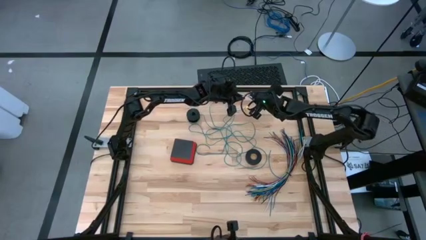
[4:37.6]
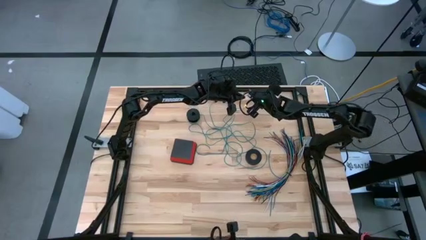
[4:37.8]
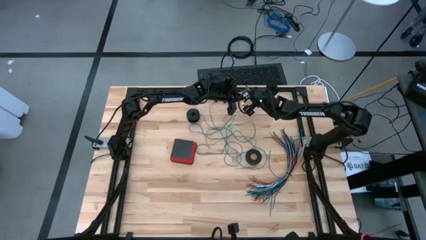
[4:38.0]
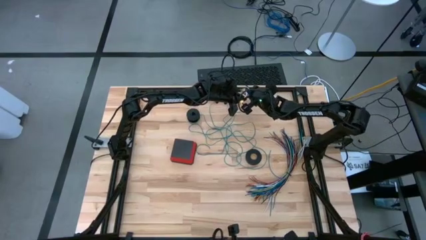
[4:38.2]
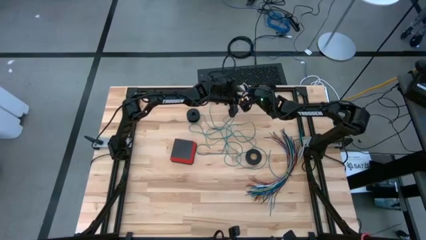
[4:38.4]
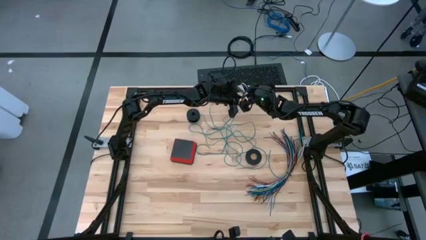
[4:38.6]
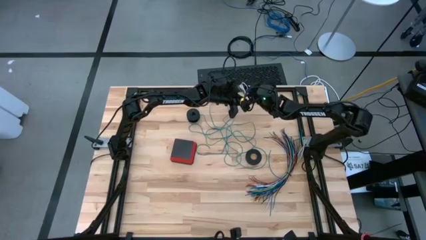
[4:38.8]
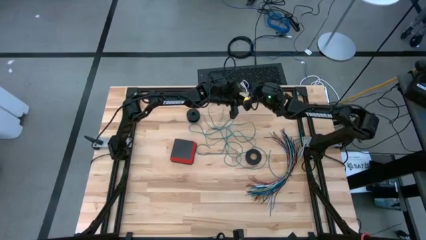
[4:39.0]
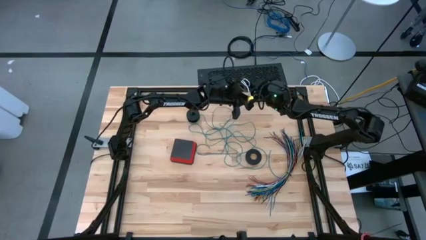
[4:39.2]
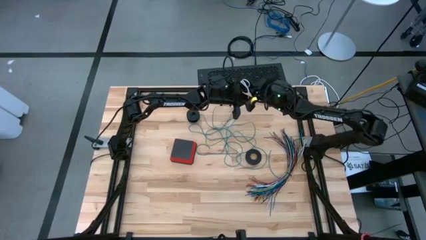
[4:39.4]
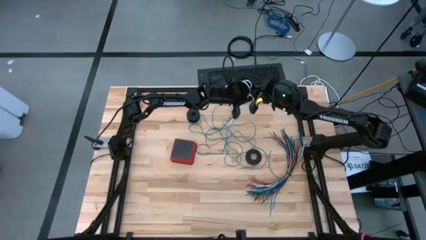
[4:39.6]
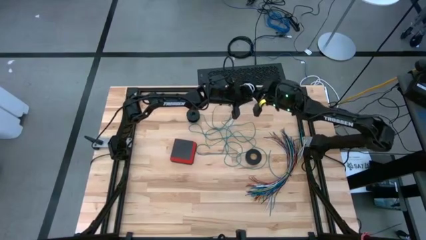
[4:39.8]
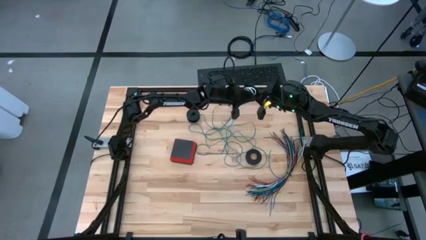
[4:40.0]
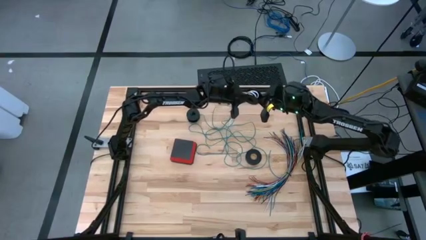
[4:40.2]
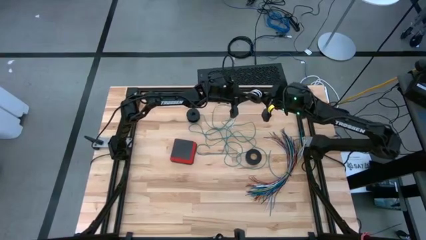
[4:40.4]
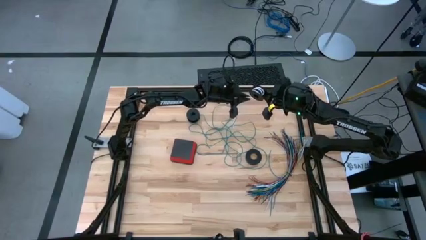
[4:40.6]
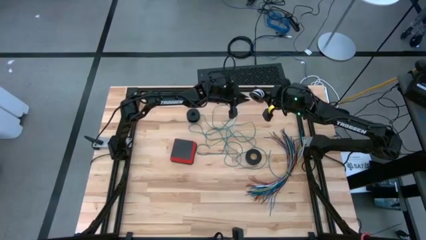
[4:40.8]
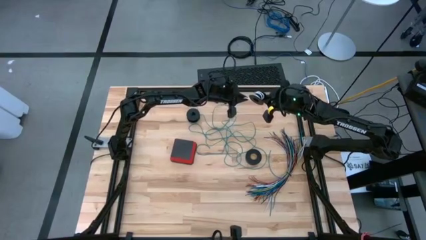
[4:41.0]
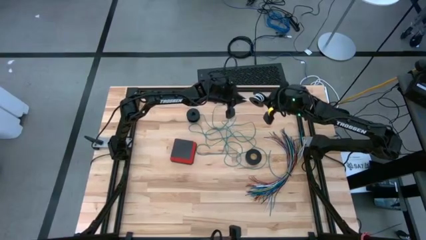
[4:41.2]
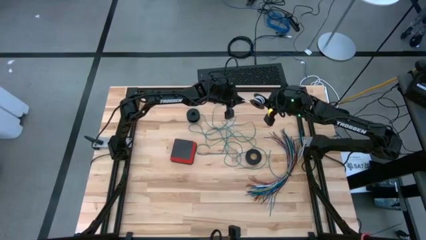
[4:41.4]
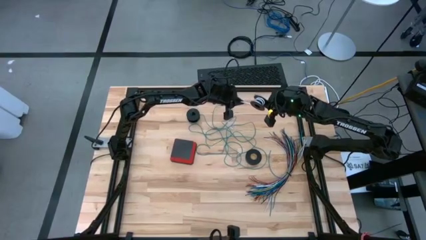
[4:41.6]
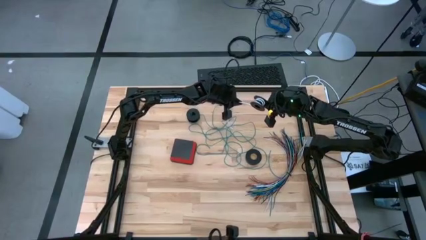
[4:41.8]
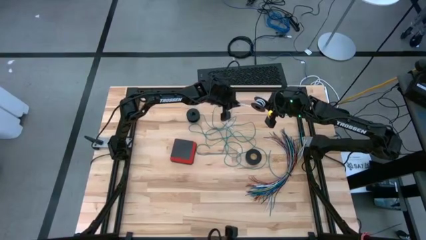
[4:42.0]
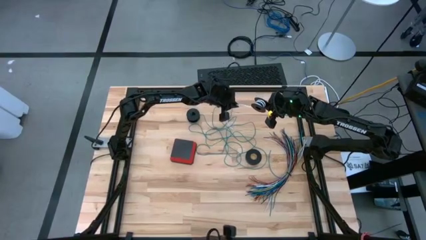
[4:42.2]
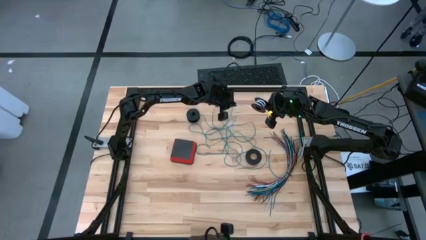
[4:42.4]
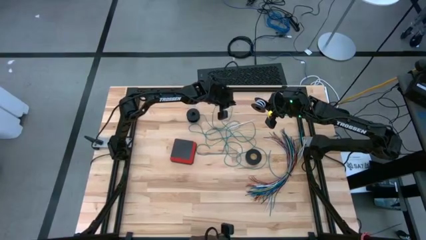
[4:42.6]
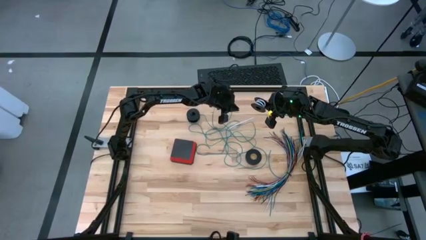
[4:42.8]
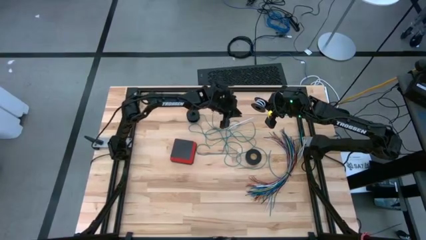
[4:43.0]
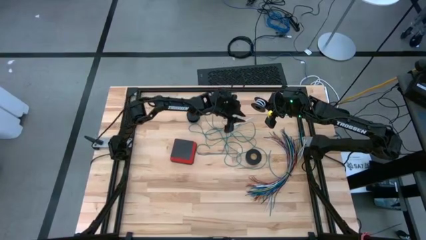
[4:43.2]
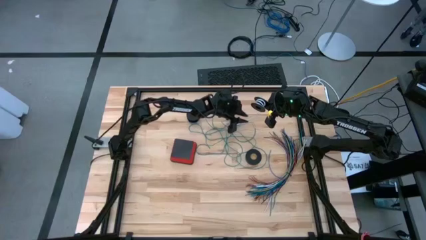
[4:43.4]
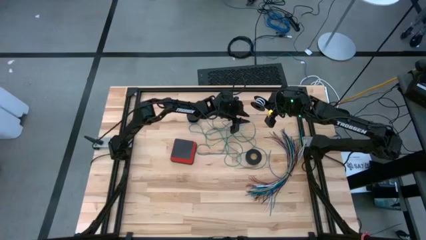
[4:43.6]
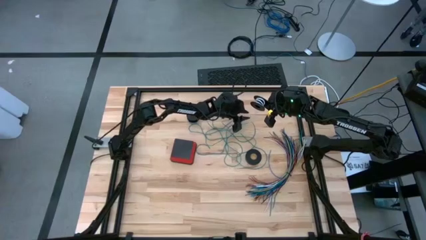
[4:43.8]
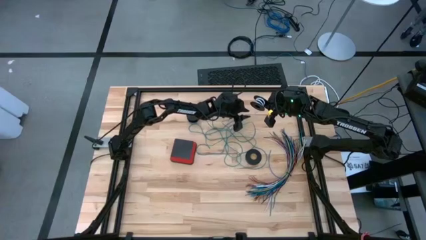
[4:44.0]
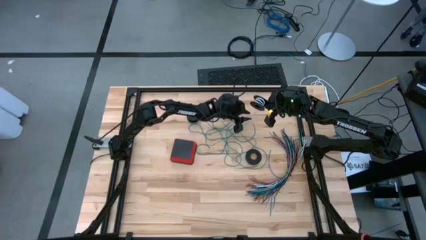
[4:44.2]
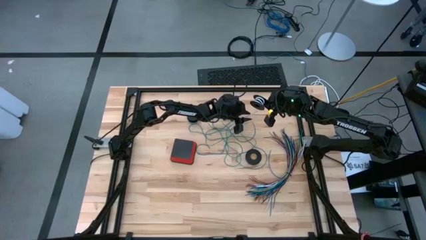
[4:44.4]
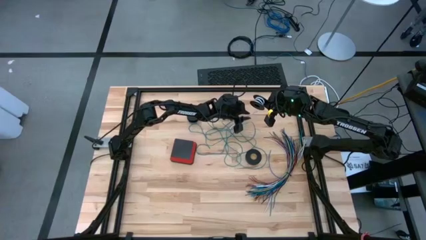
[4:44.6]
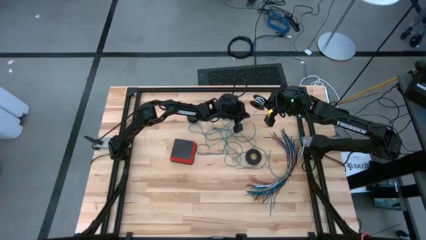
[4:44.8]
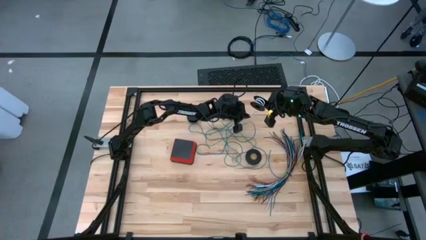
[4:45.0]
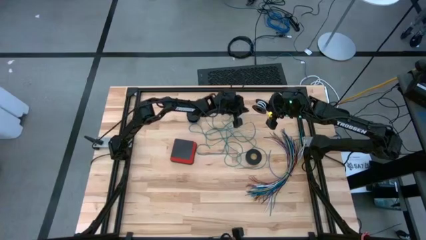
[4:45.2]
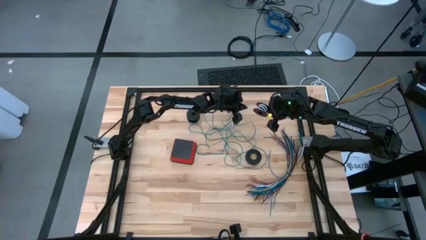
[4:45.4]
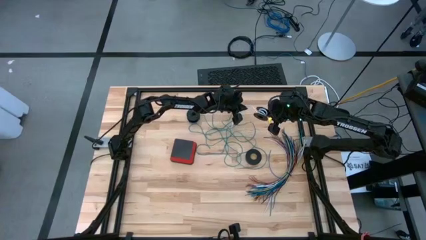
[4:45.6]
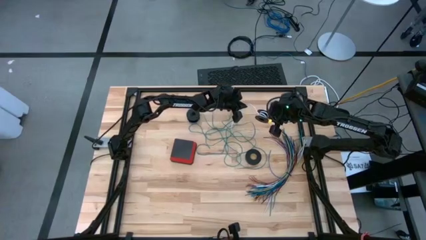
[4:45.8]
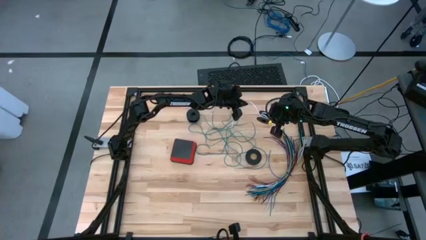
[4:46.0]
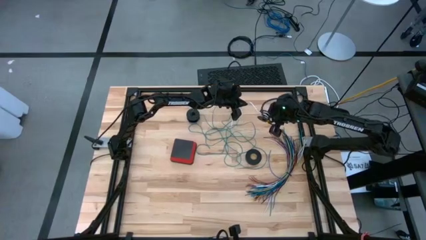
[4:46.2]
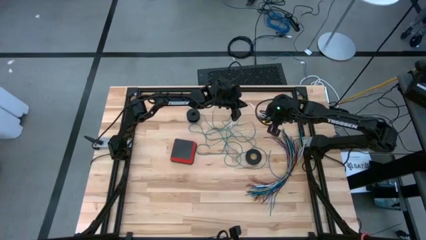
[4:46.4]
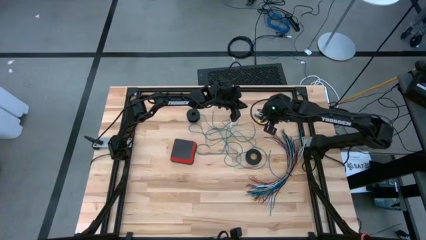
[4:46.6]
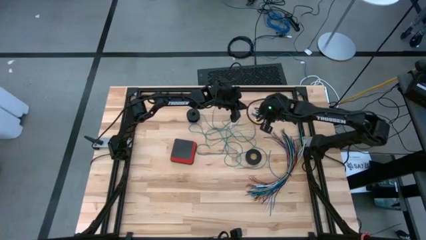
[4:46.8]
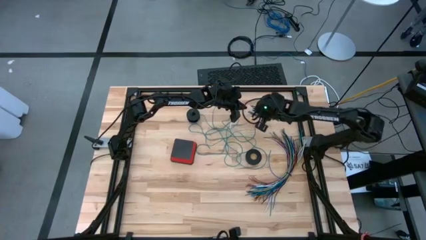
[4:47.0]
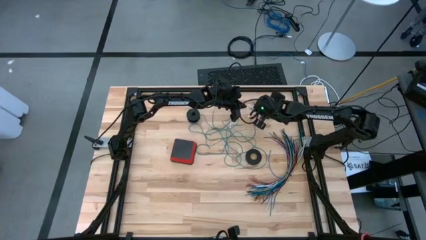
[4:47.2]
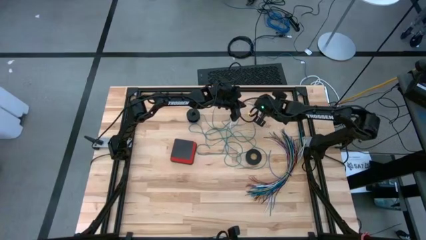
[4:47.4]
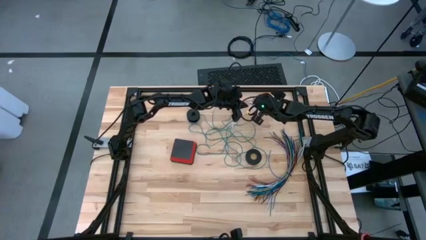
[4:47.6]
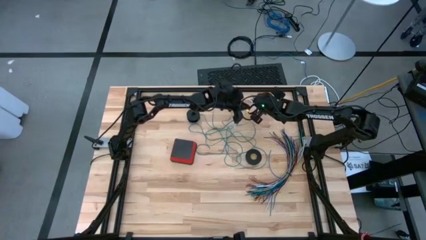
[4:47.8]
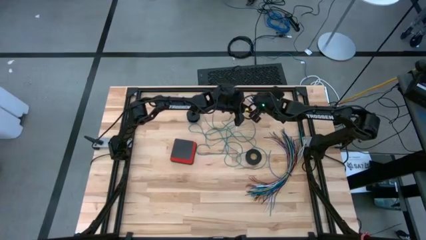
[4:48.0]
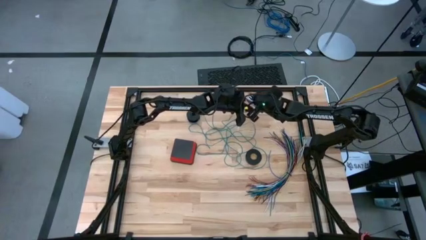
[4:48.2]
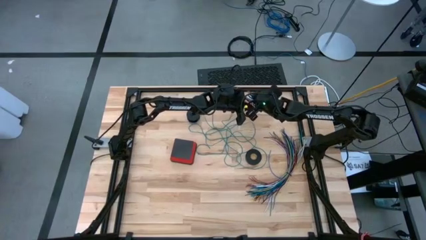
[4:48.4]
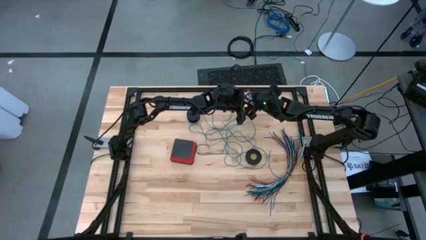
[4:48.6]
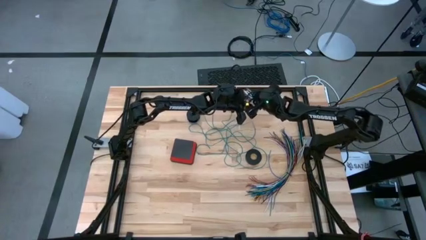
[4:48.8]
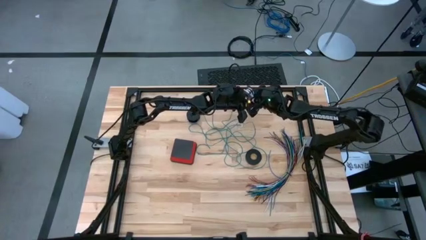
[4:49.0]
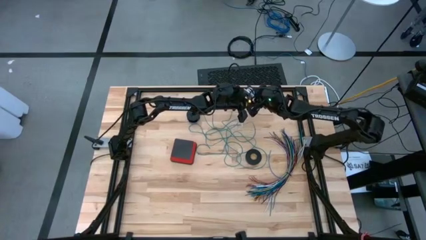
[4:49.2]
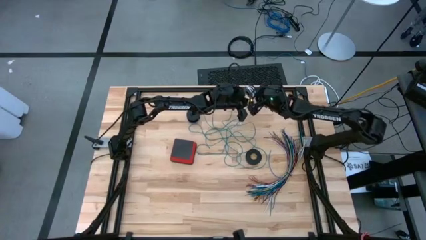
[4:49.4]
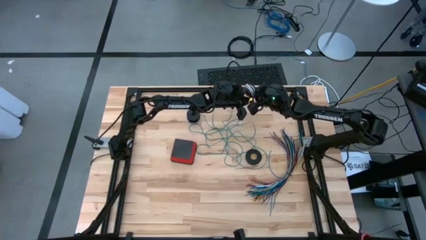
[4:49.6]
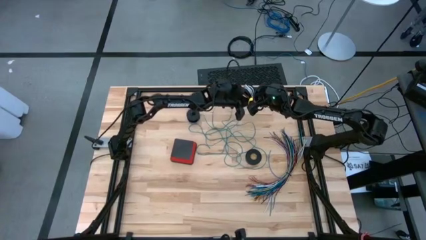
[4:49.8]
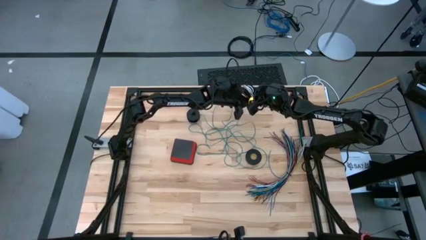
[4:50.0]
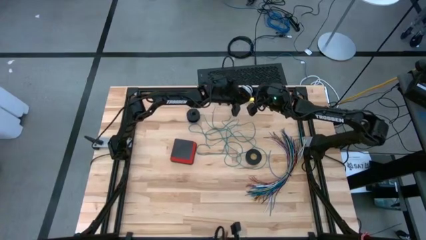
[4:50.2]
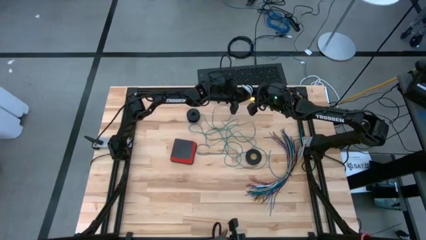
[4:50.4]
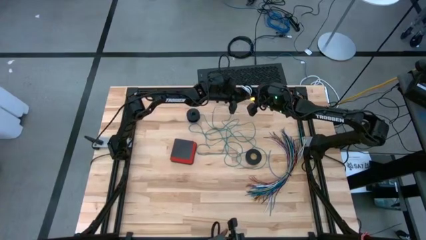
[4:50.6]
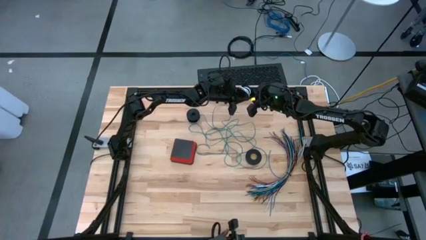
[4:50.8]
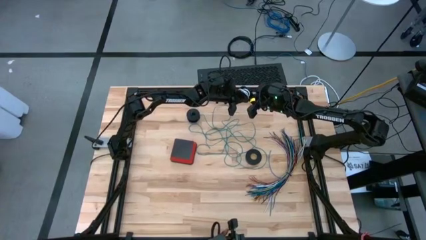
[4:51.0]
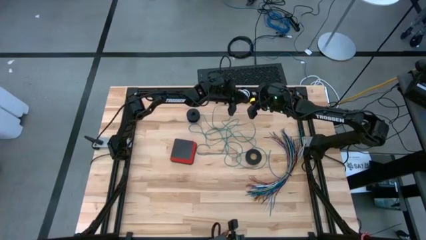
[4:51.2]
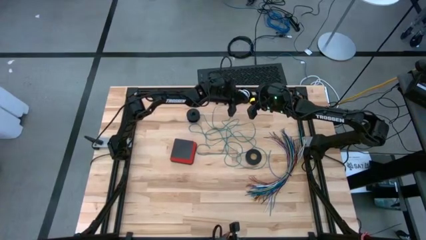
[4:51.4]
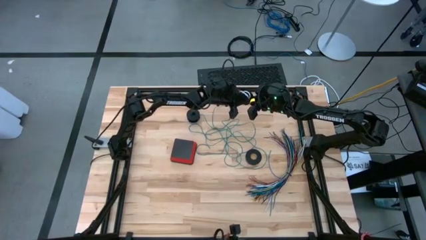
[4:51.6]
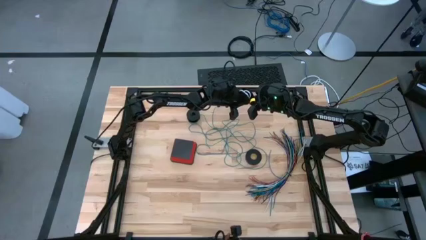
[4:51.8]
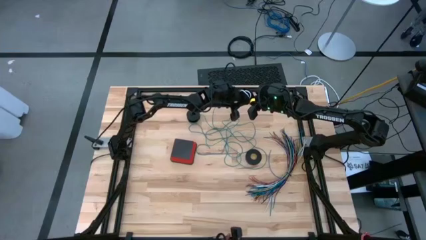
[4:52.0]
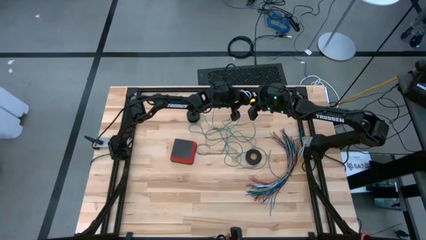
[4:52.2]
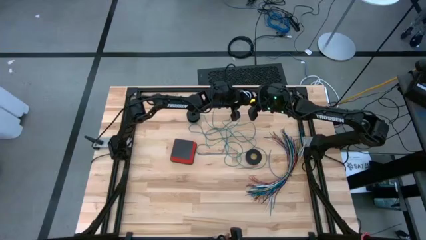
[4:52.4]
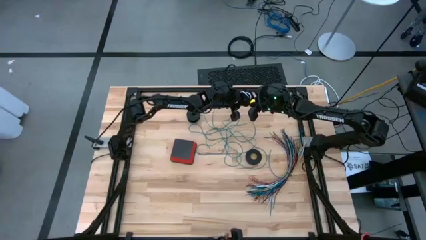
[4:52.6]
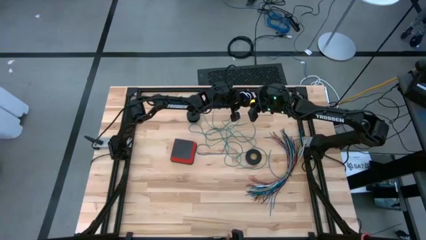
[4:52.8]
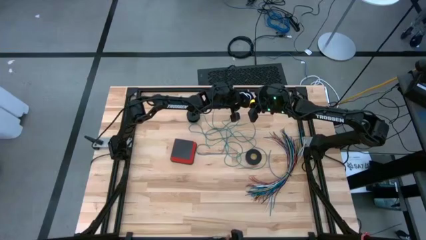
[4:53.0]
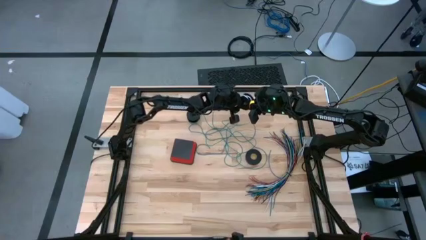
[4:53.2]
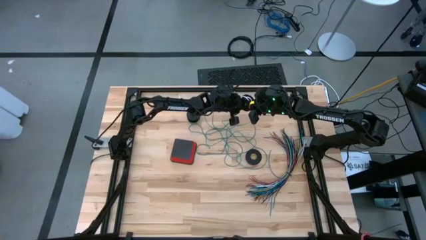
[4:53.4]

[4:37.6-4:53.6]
Task: Coiling cords
Coil the white wire cable on the spool
